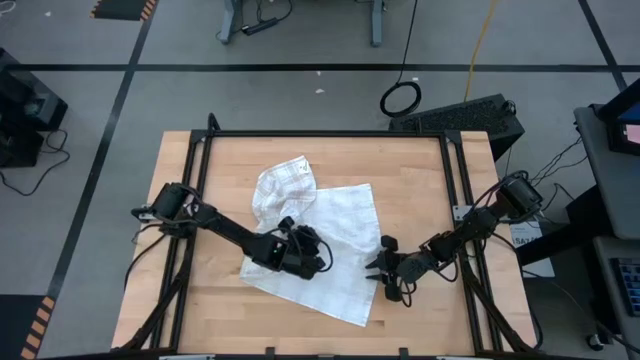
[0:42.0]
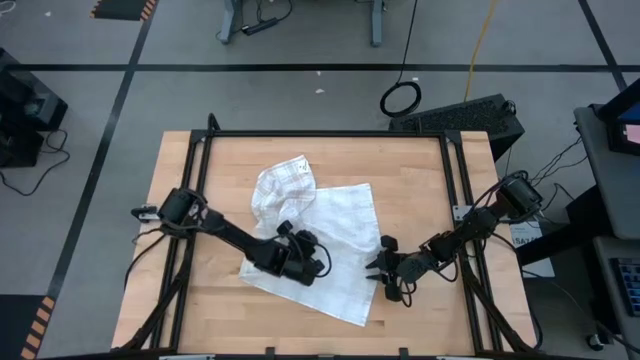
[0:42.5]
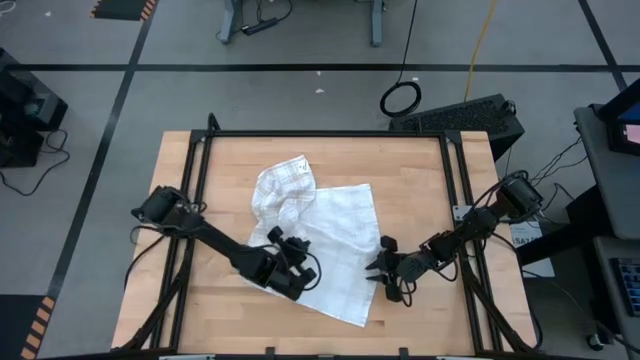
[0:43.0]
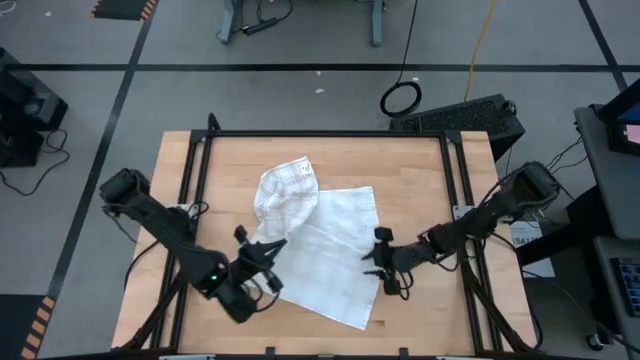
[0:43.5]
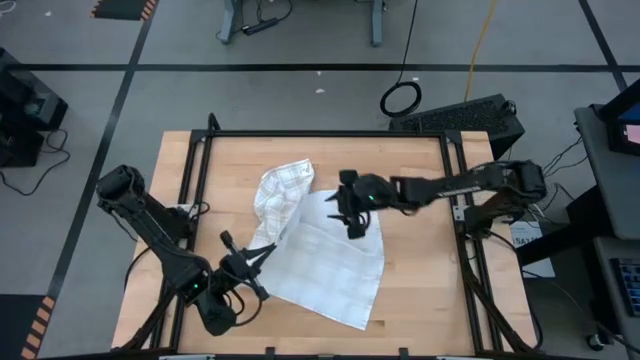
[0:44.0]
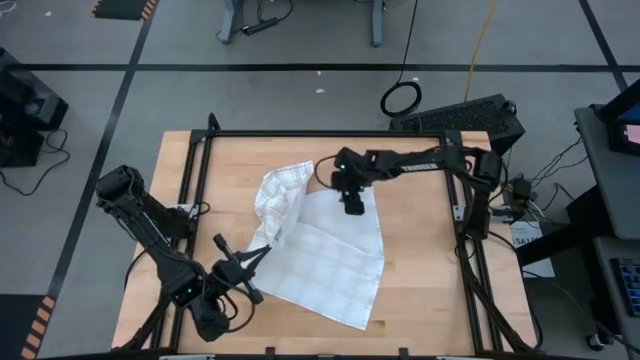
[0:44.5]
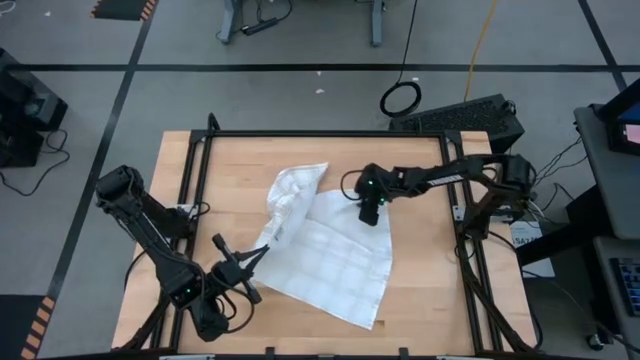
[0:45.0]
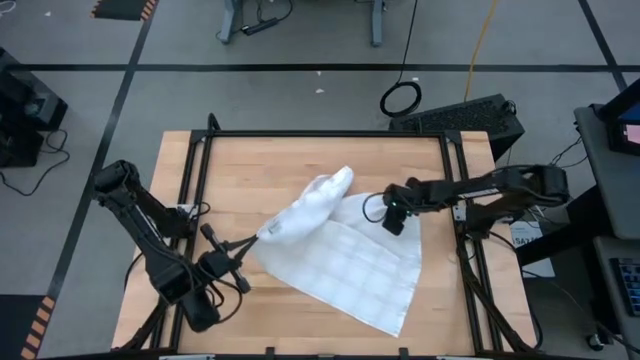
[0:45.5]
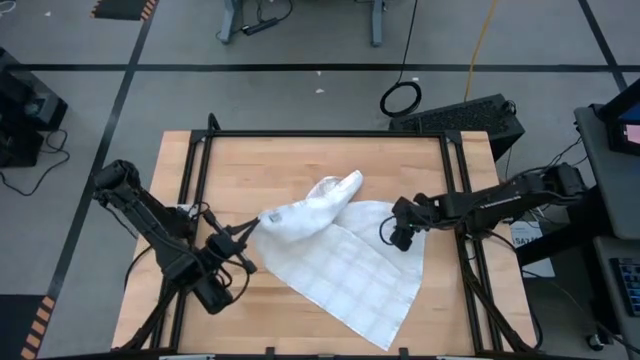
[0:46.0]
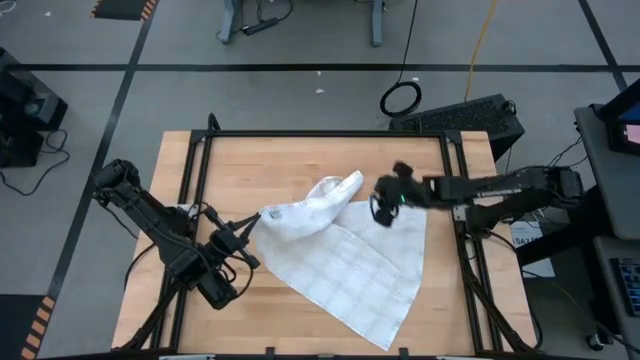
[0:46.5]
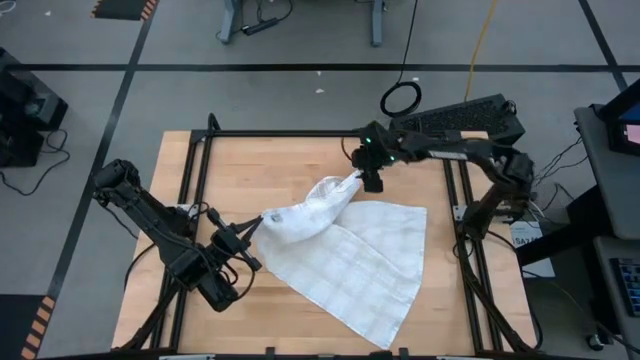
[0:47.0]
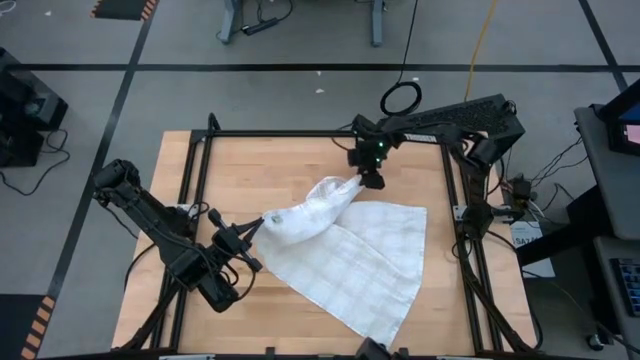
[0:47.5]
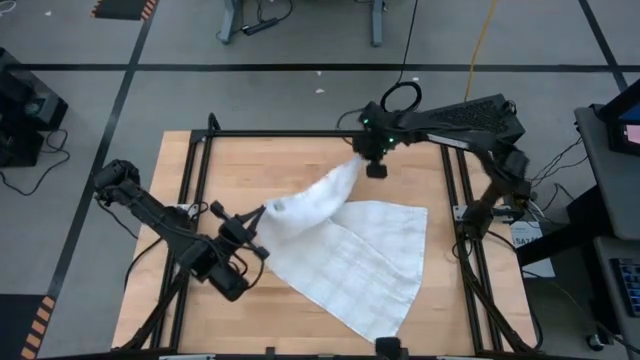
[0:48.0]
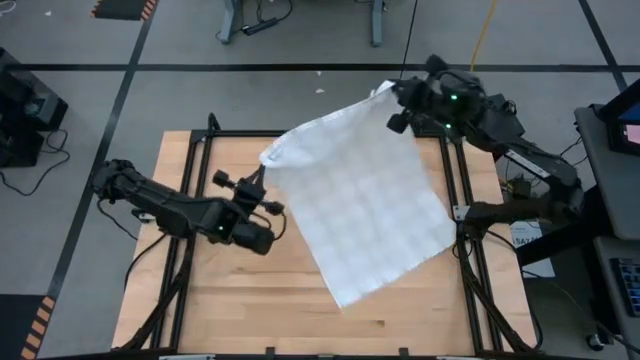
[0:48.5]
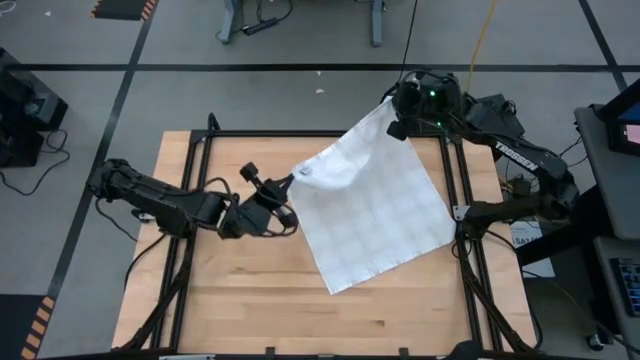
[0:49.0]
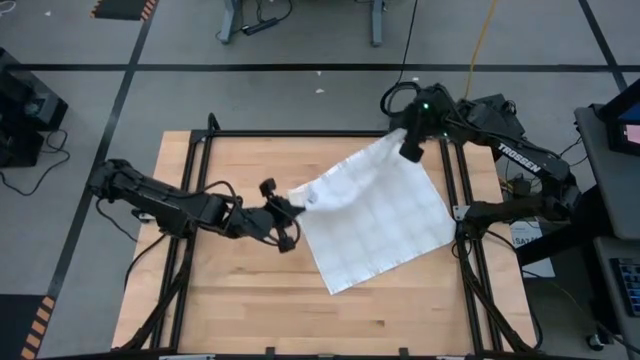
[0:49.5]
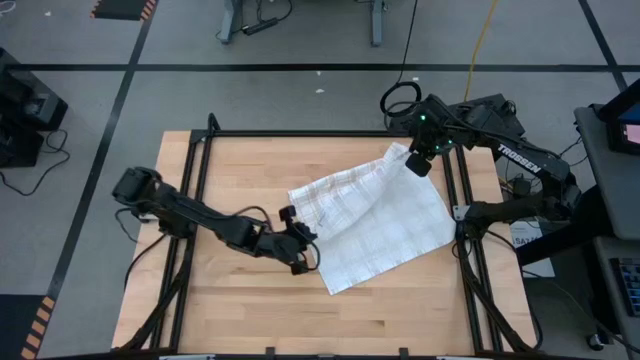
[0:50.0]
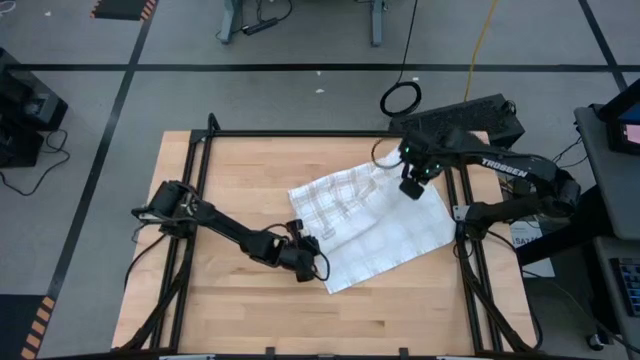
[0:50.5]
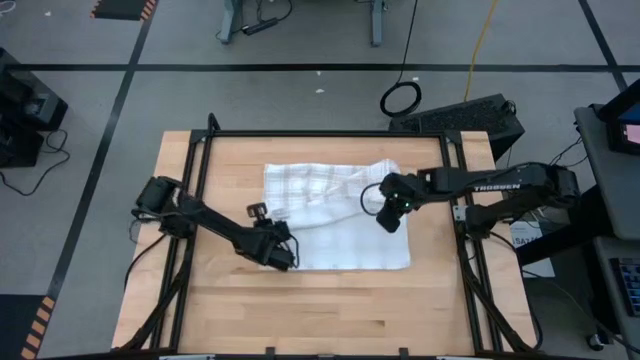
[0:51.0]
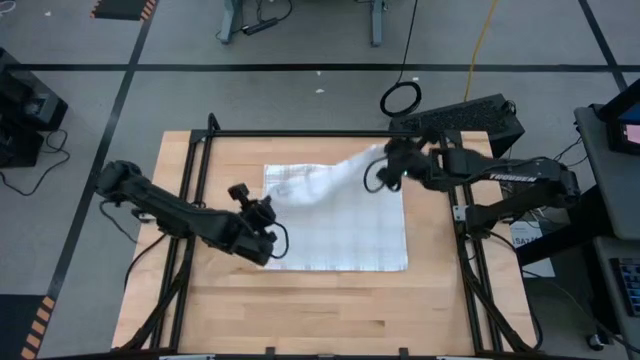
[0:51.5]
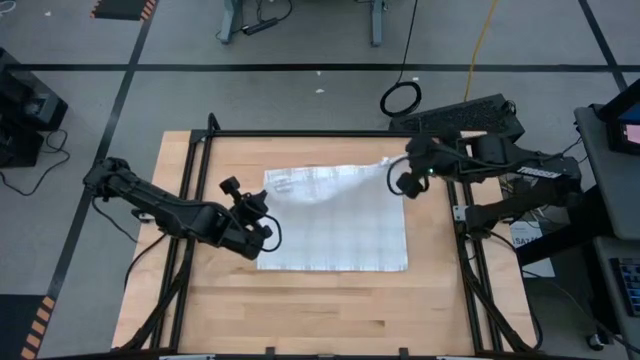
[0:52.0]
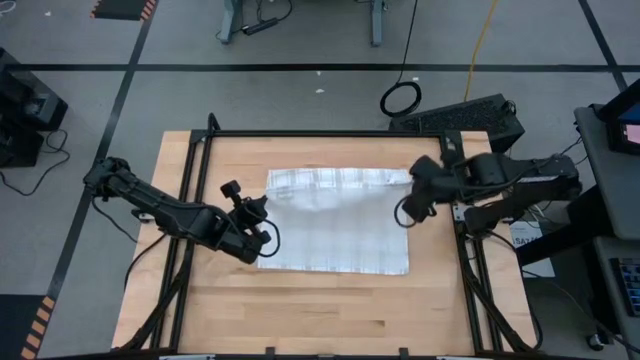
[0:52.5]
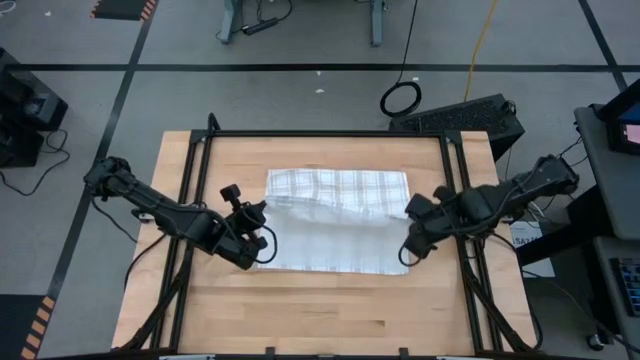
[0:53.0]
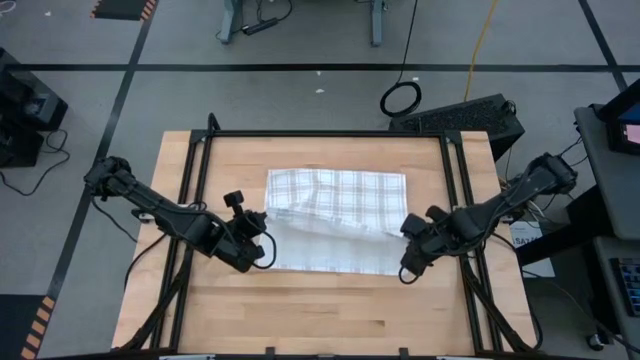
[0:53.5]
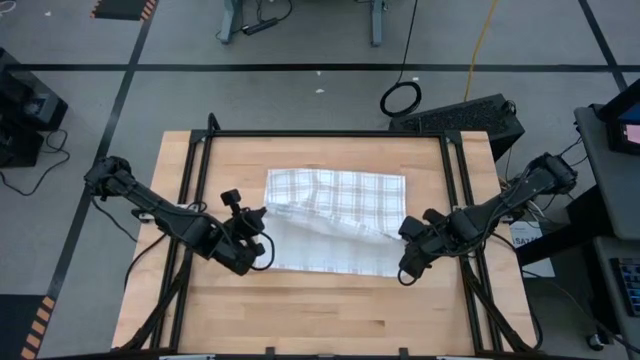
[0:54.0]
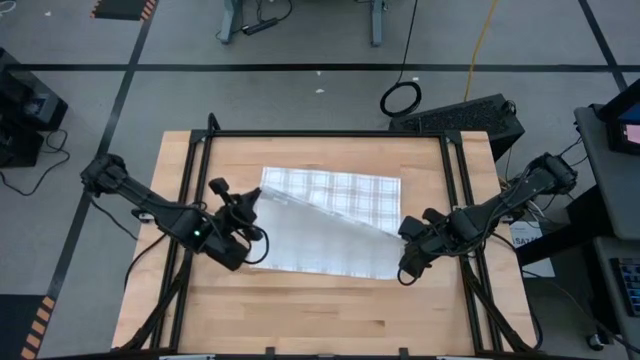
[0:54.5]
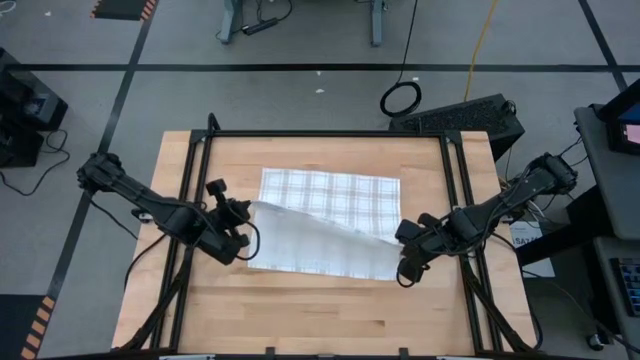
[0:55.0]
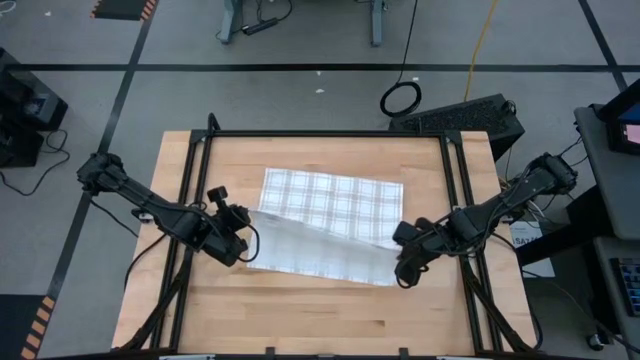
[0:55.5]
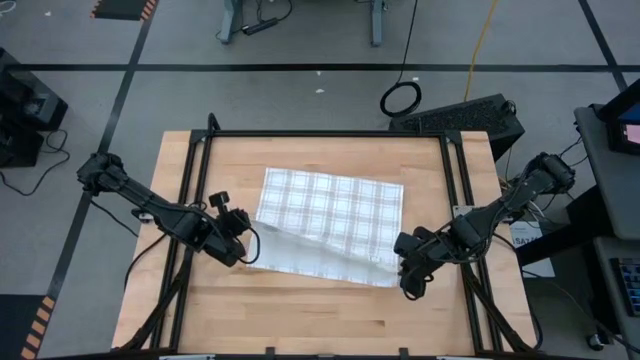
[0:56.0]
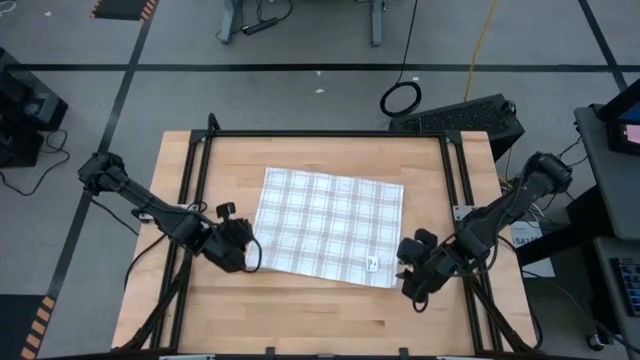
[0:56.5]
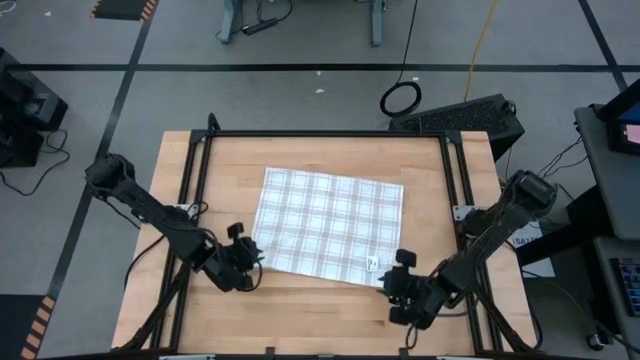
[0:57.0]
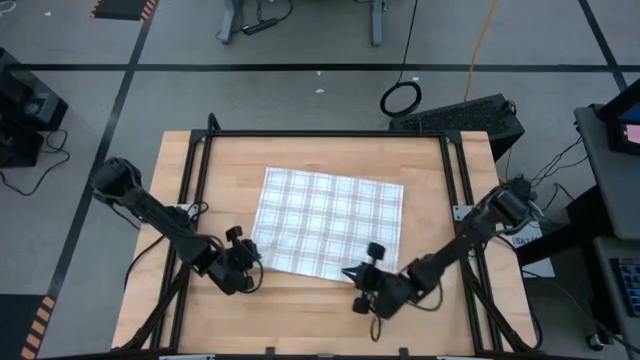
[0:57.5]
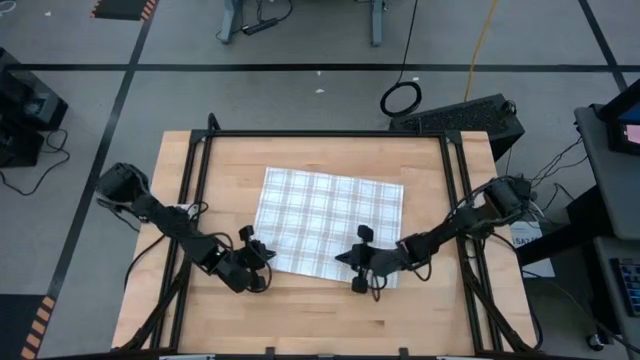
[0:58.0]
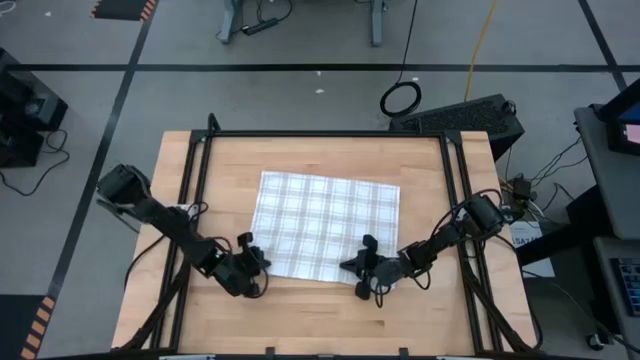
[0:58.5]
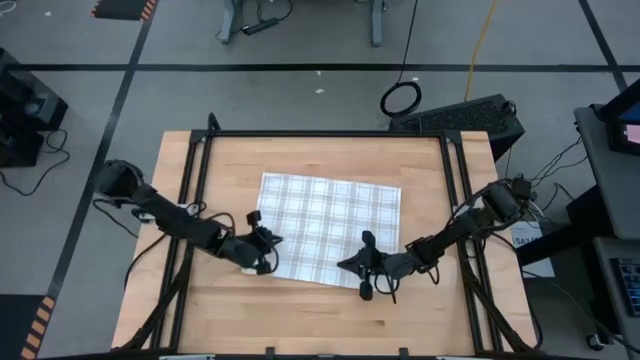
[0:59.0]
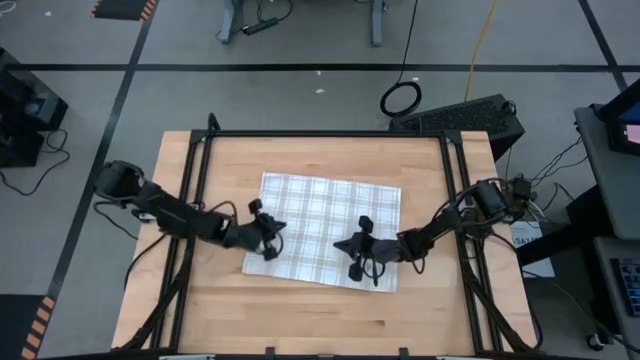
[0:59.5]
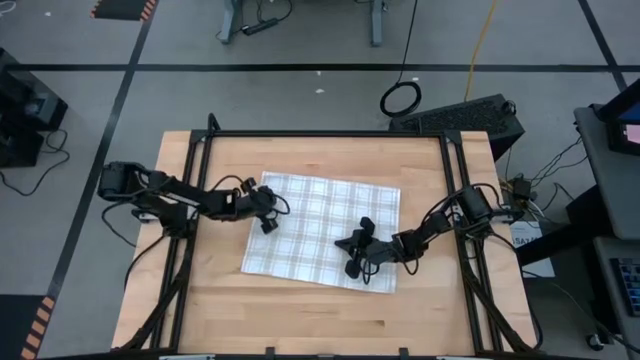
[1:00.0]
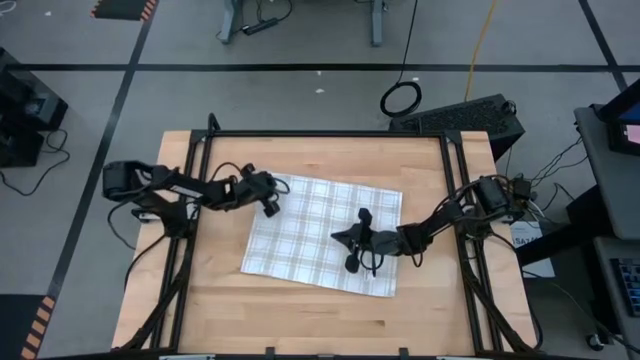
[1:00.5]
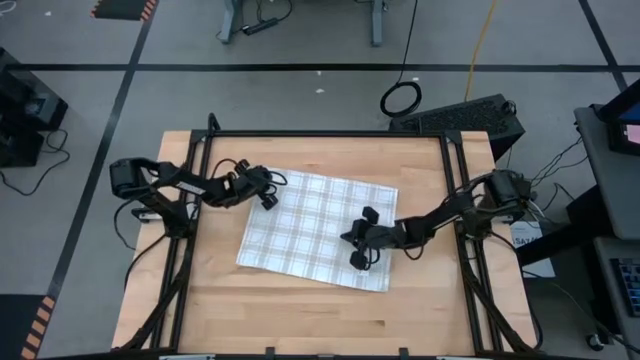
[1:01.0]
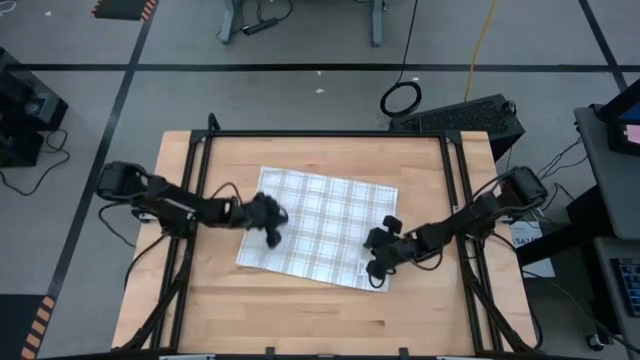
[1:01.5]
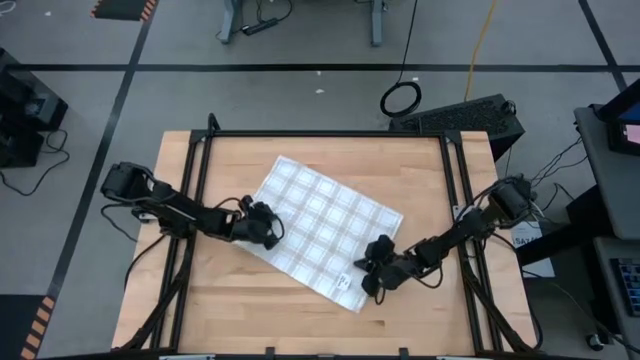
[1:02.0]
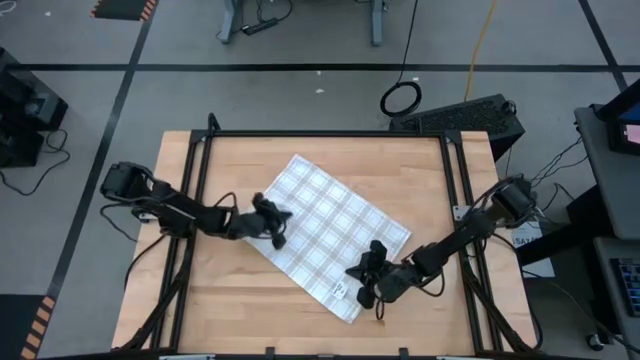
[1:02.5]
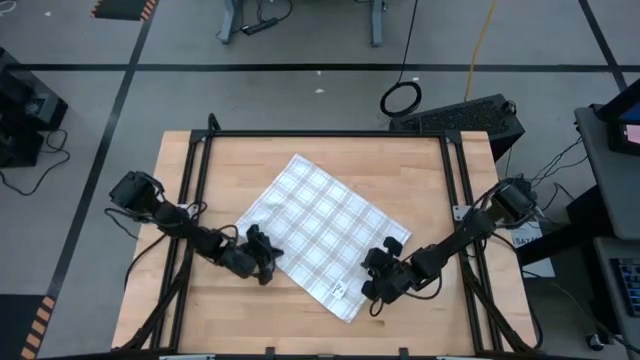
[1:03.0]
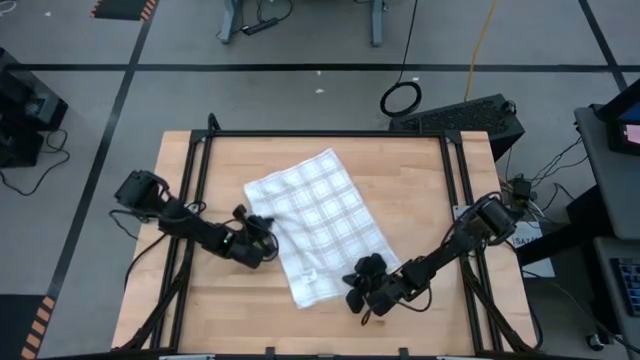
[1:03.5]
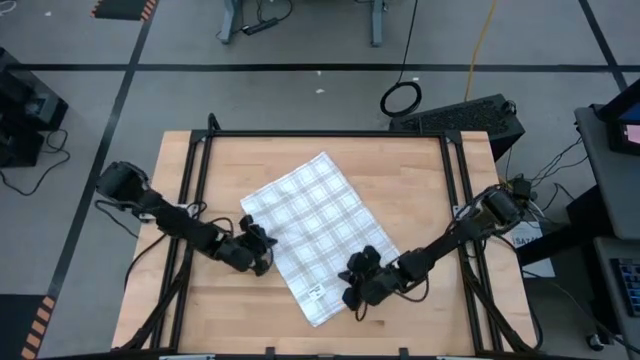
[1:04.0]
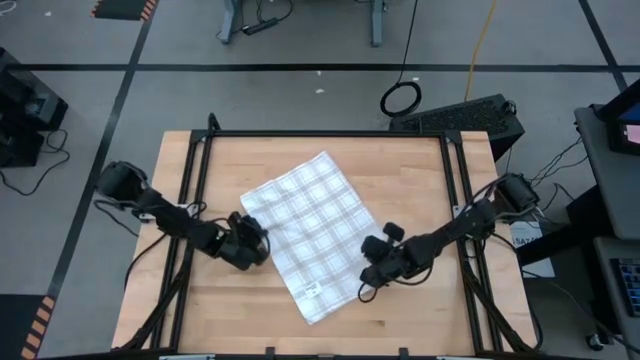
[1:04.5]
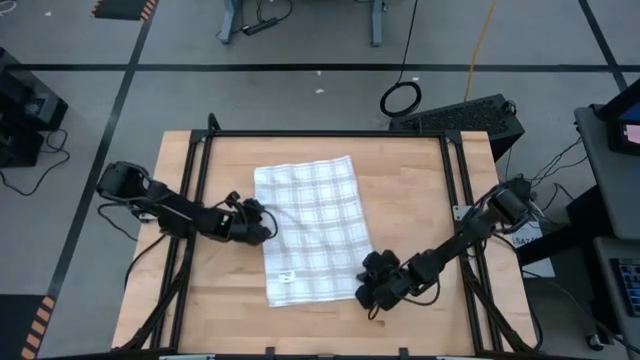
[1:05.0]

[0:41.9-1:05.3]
Task: Roll towel
Fold the brown checkered towel
